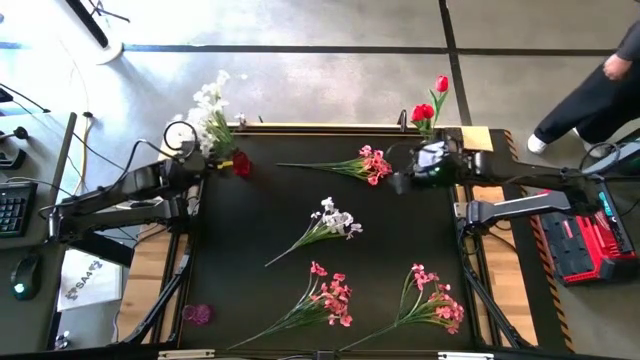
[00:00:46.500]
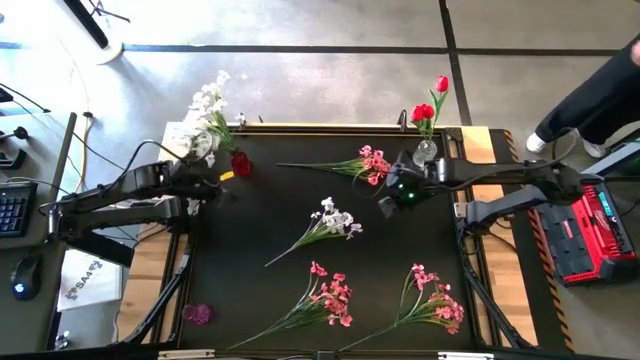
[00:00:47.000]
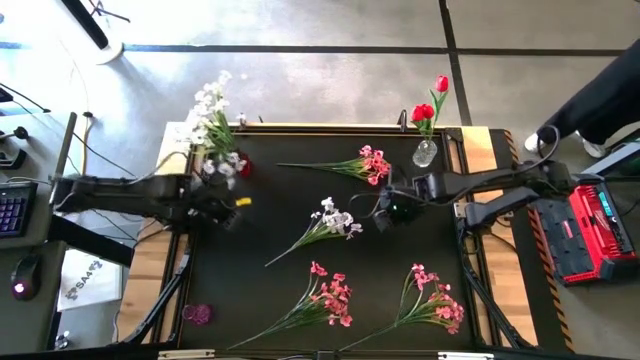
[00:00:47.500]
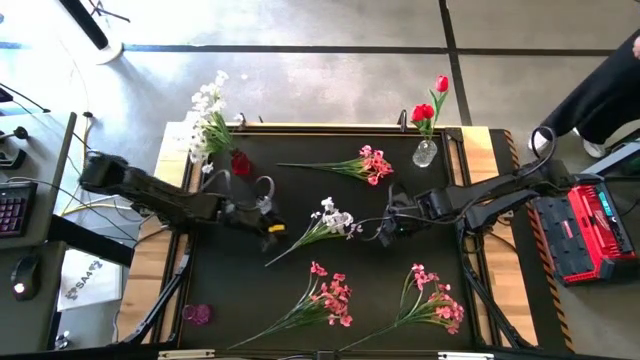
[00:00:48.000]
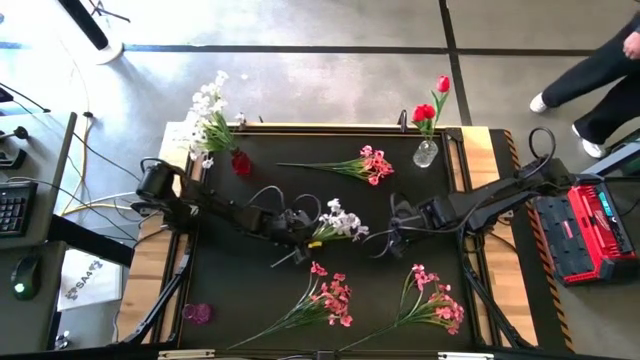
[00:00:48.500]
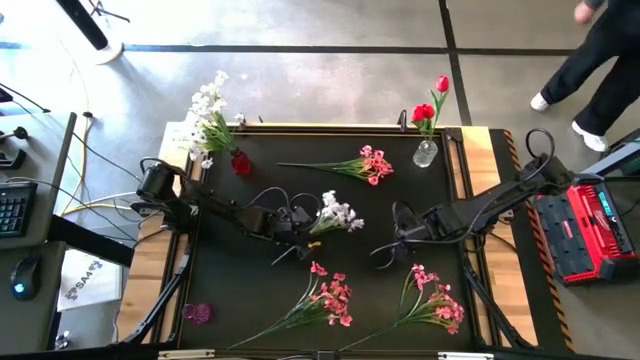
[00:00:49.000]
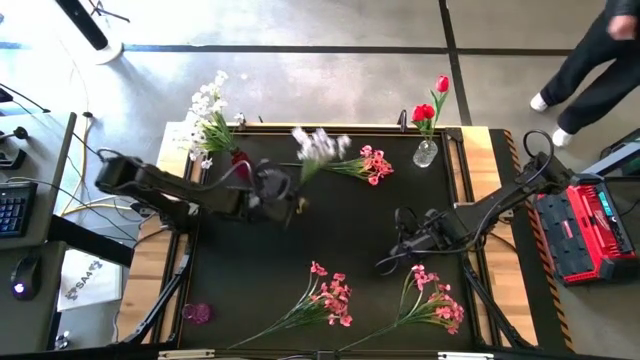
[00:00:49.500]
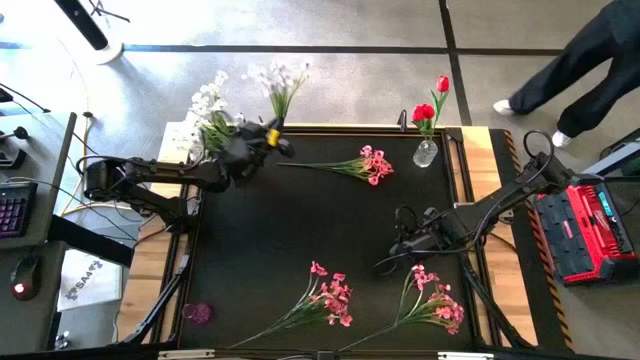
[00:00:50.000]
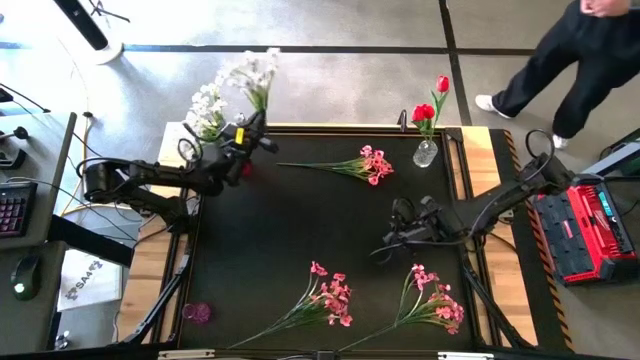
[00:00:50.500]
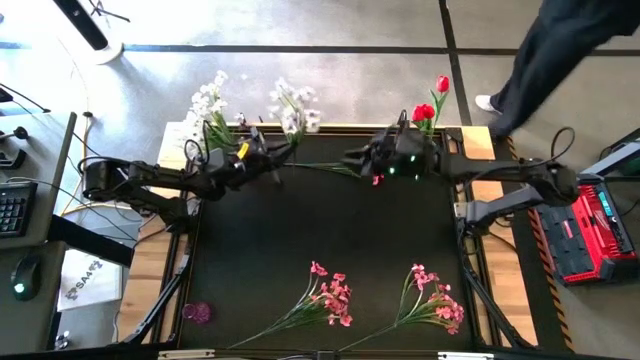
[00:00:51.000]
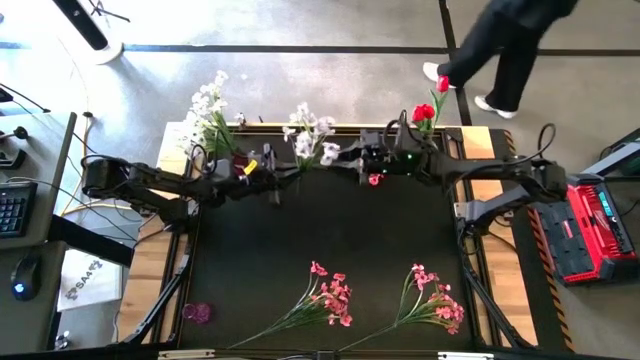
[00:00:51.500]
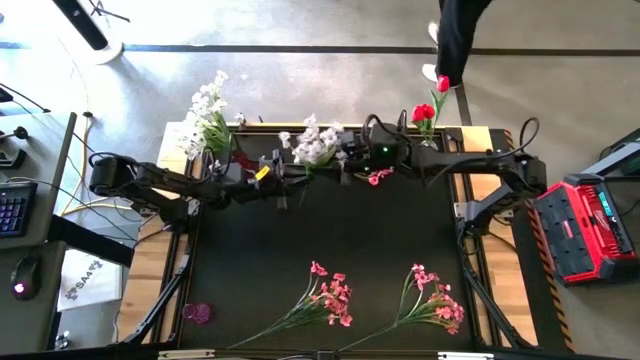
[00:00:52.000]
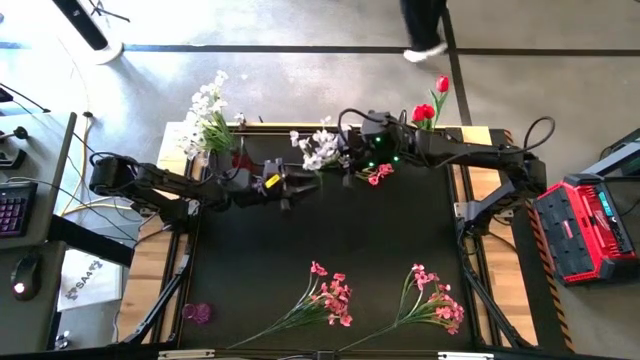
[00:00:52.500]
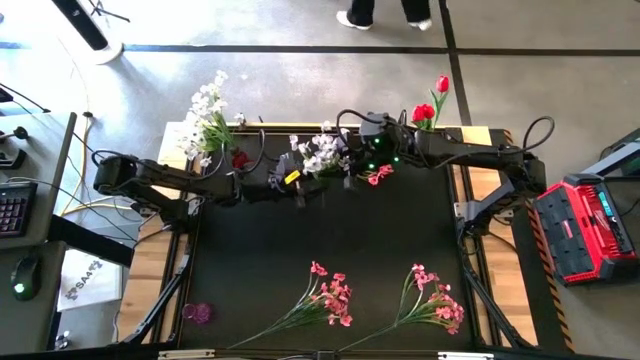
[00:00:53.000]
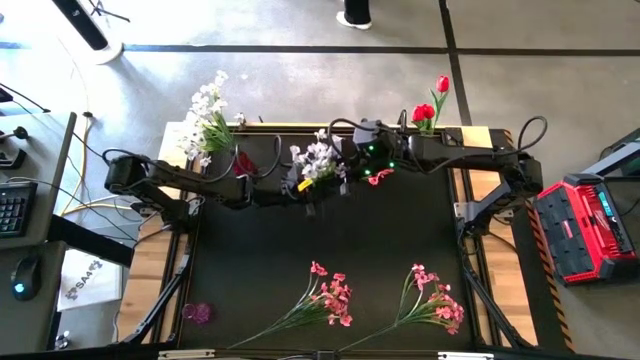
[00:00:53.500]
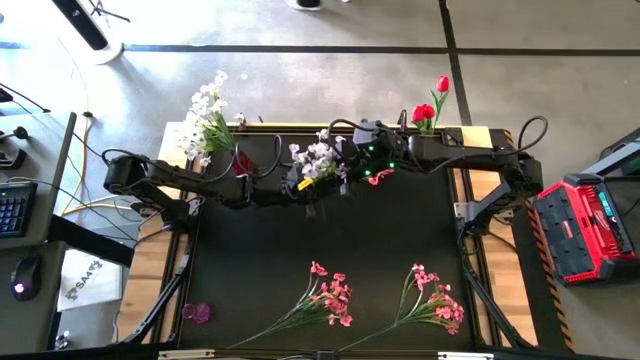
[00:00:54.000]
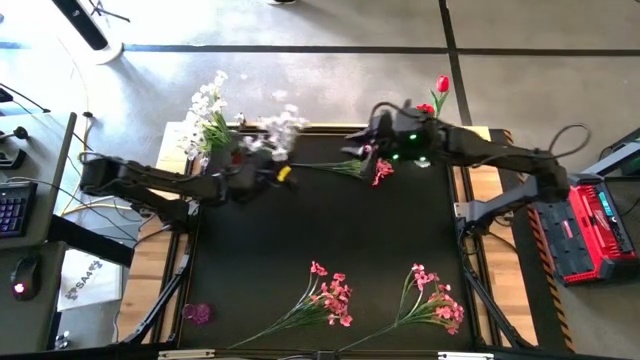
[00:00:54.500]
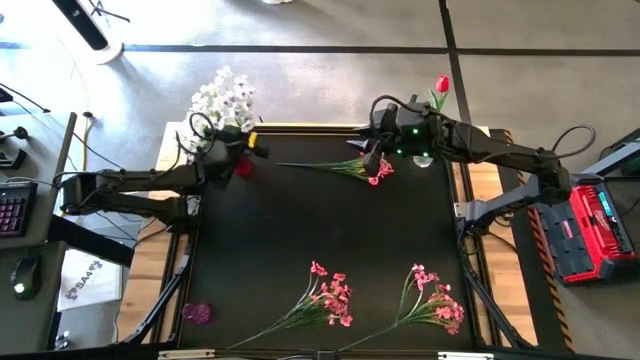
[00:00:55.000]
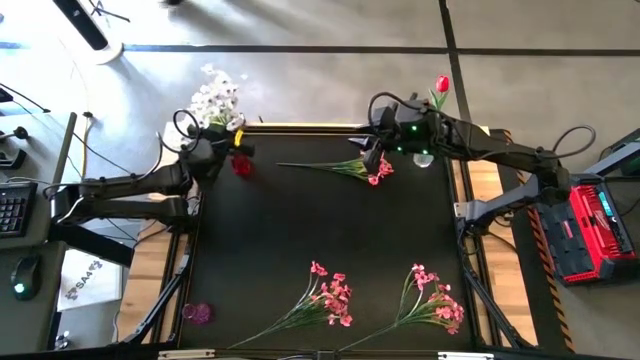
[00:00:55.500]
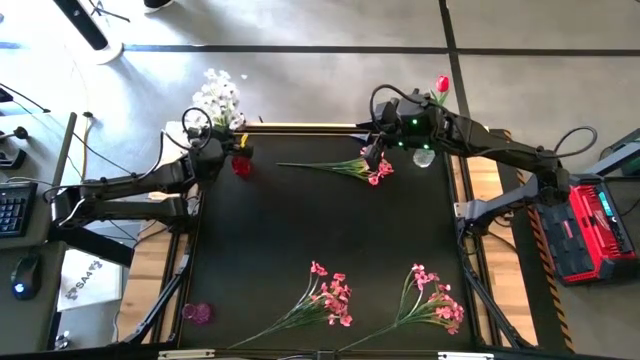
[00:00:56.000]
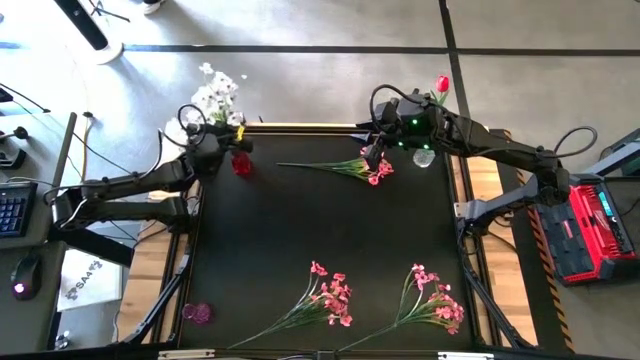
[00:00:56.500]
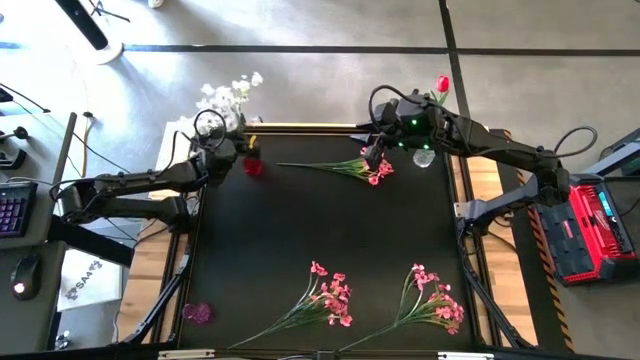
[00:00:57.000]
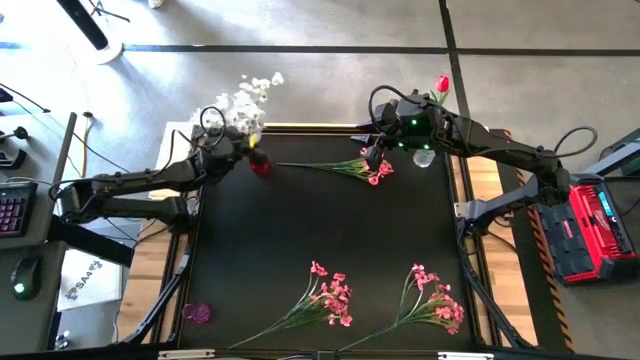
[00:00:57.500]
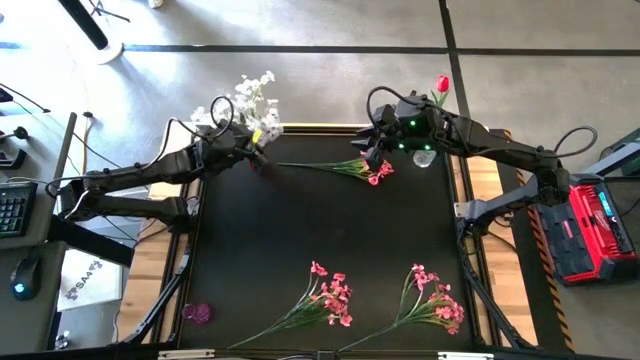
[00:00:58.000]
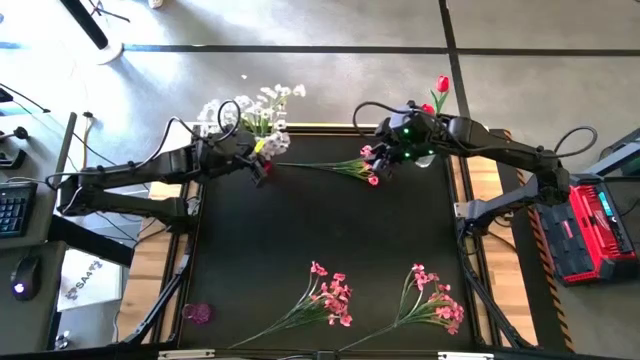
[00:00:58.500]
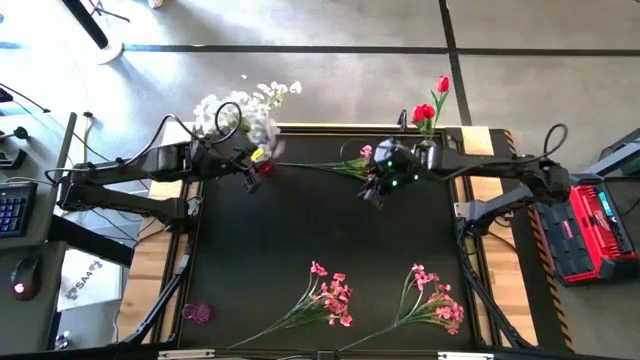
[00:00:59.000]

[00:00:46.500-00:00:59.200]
Task: Sort flowers into vase by color
Put the white flowers into the red vase

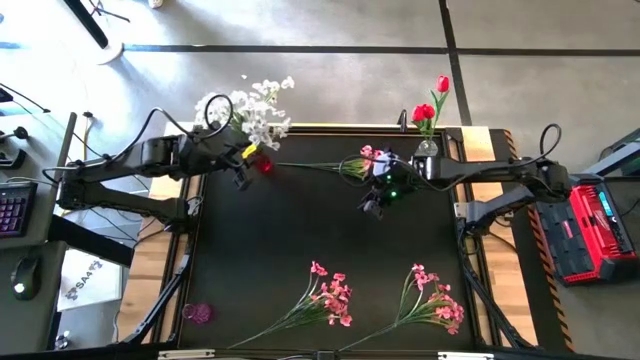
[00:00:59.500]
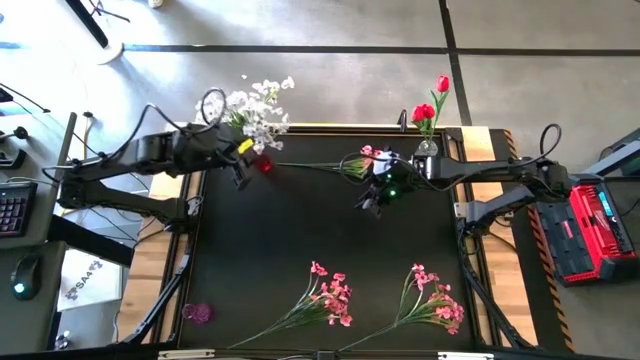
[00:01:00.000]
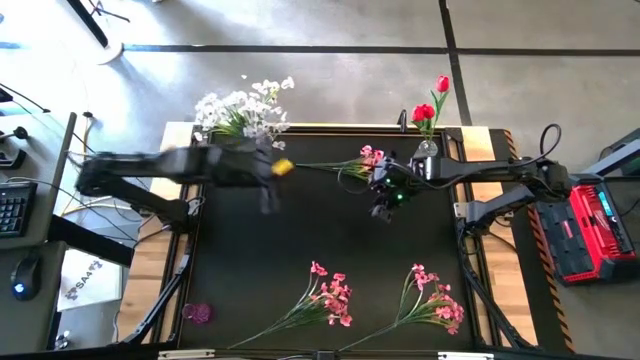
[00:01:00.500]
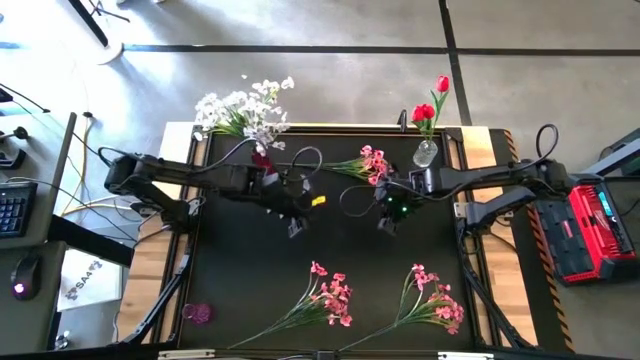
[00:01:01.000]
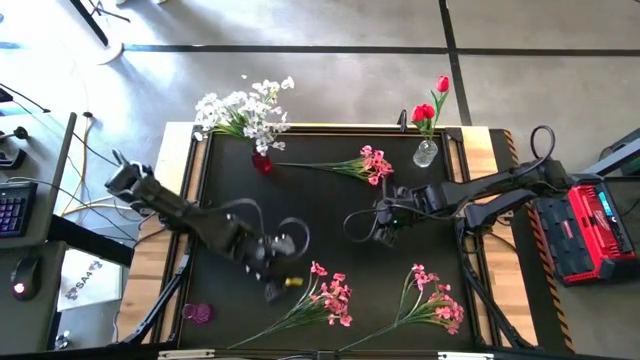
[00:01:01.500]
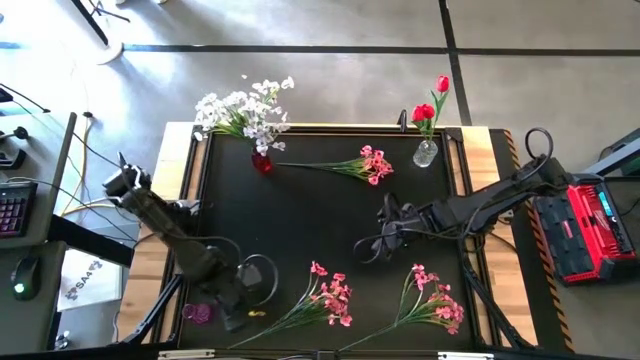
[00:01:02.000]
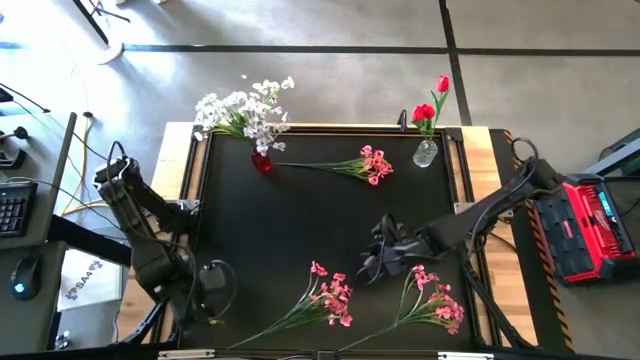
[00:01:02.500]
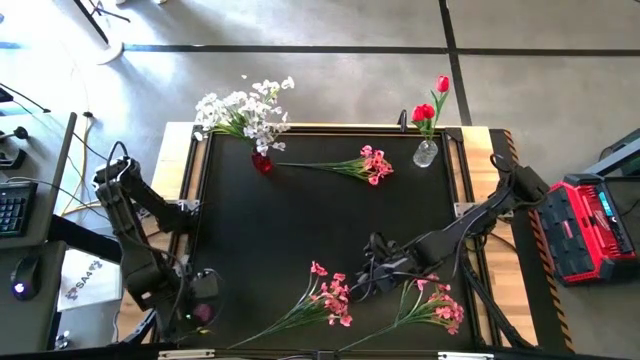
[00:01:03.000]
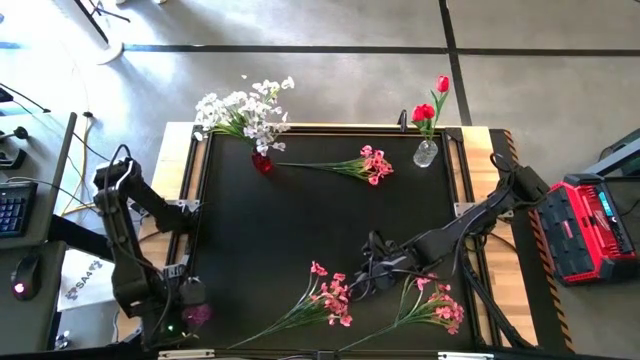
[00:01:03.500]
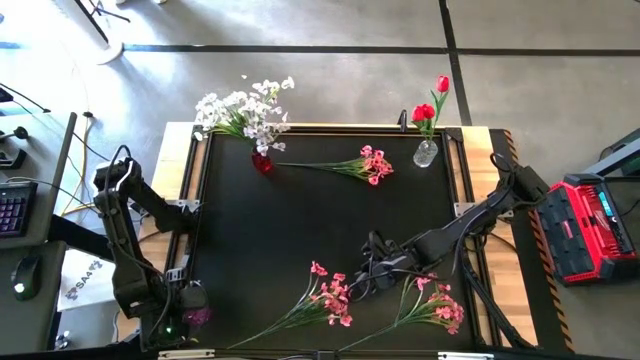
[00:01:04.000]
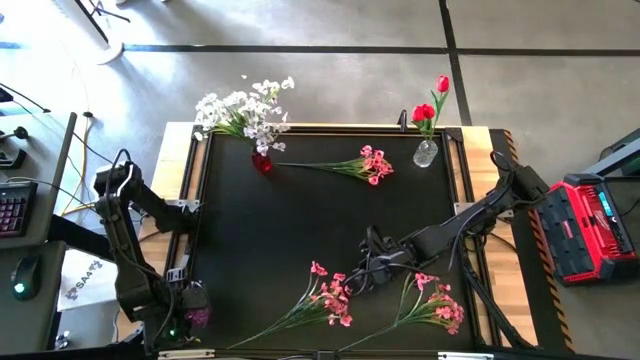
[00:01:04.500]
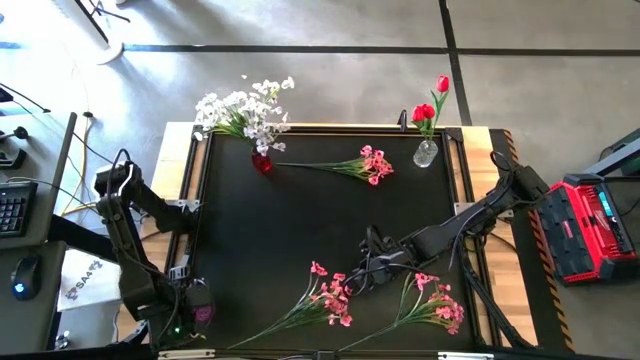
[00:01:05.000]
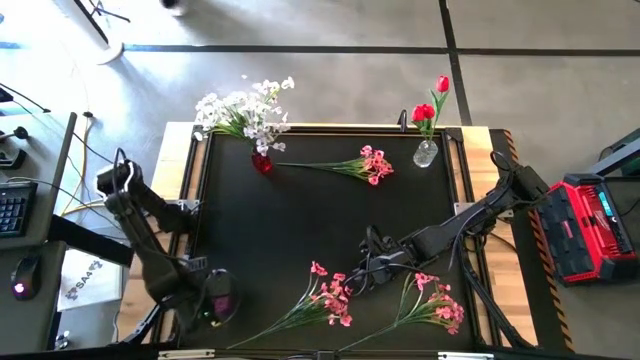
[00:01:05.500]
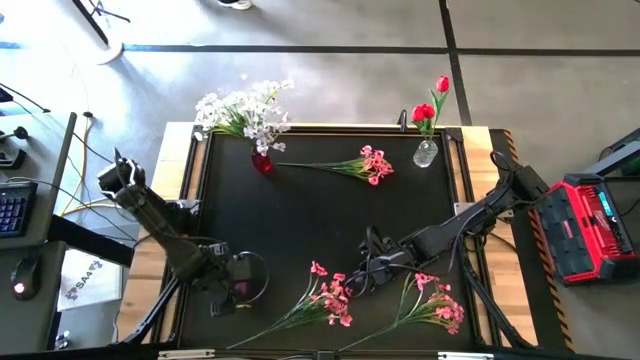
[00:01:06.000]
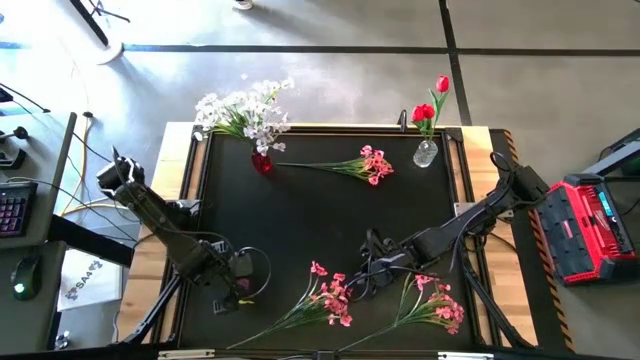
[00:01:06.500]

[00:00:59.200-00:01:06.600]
Adjust the violet vase
